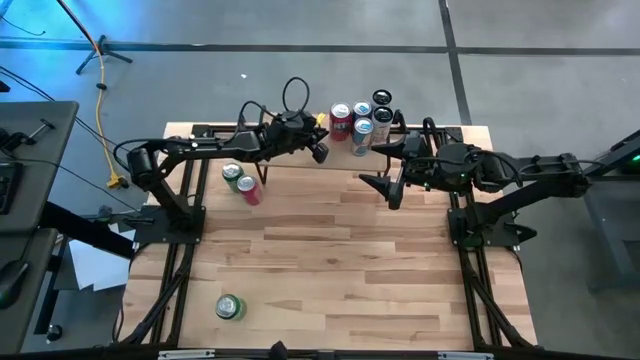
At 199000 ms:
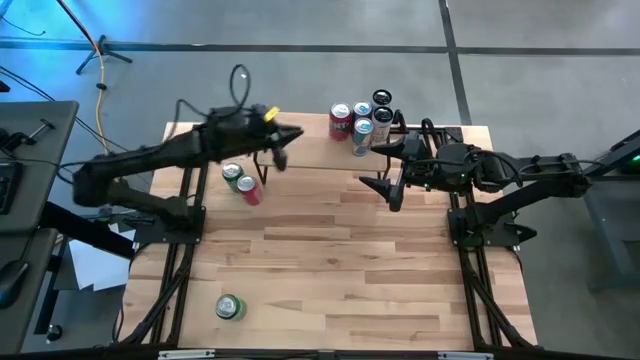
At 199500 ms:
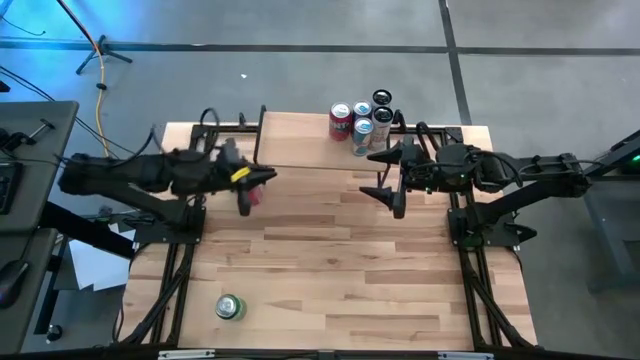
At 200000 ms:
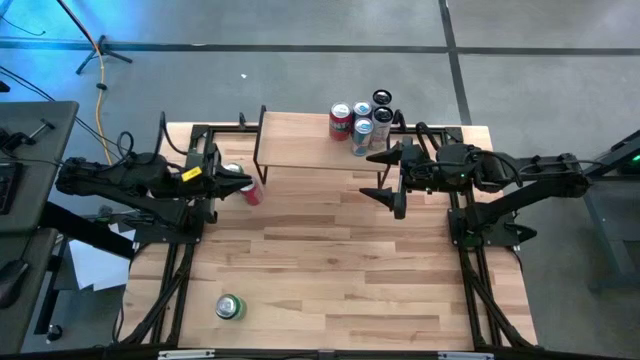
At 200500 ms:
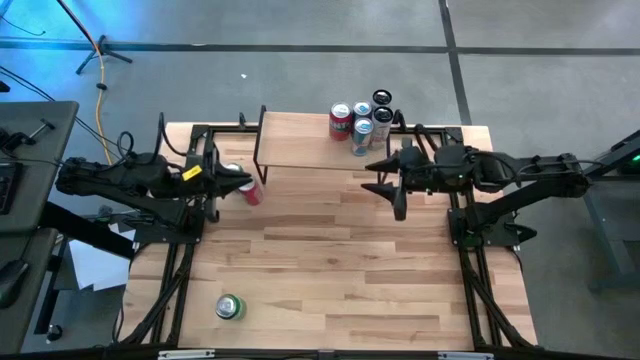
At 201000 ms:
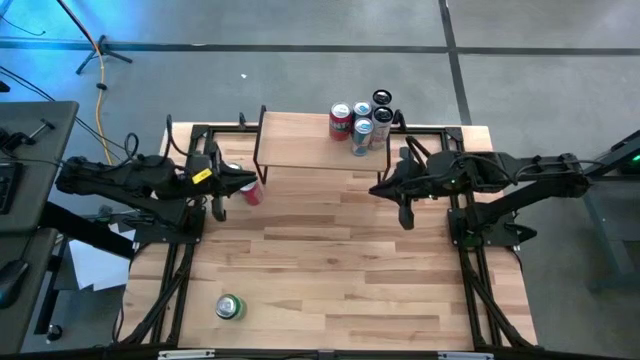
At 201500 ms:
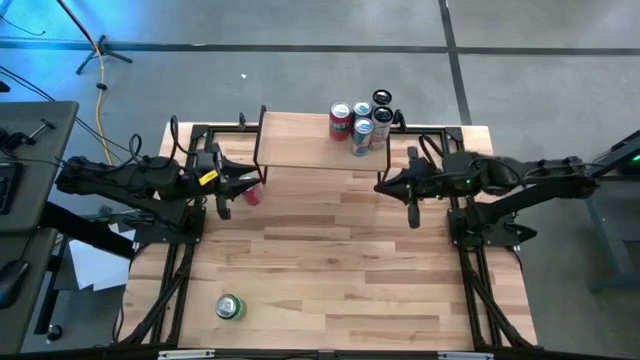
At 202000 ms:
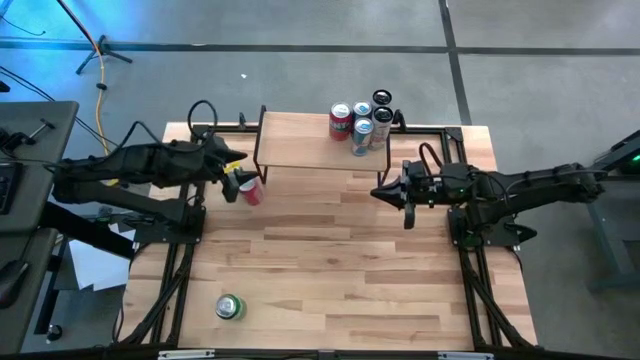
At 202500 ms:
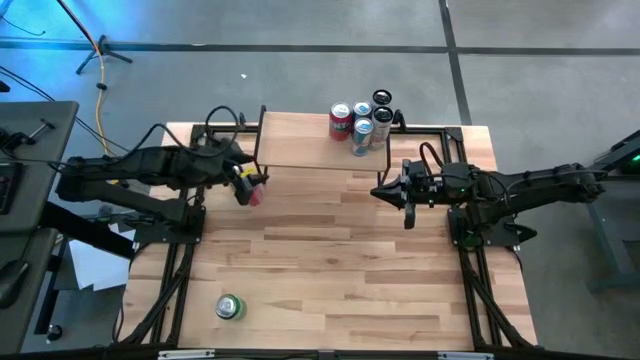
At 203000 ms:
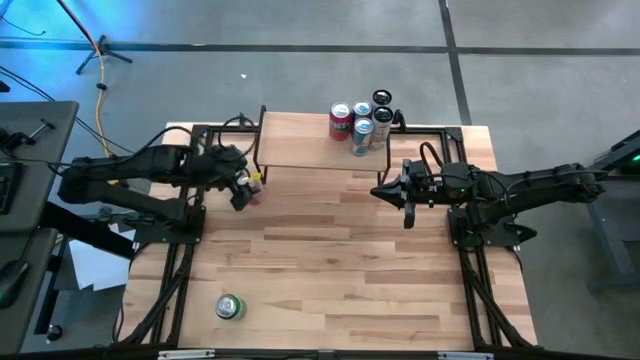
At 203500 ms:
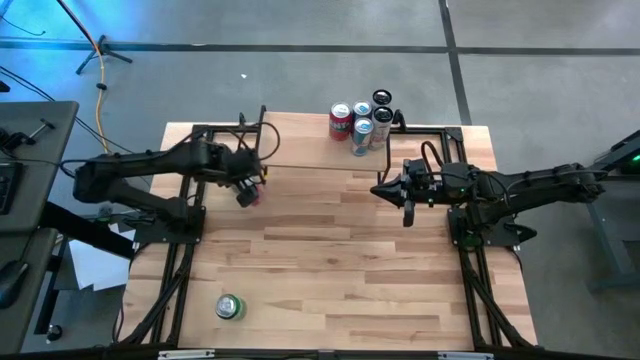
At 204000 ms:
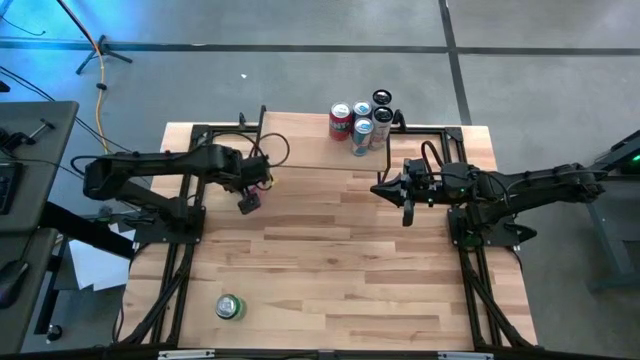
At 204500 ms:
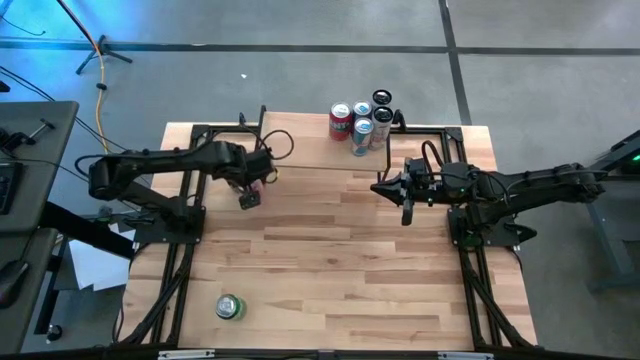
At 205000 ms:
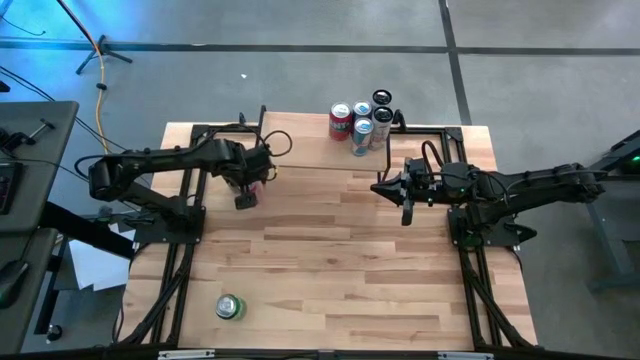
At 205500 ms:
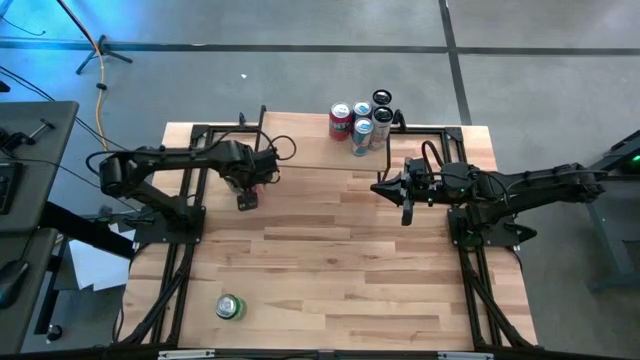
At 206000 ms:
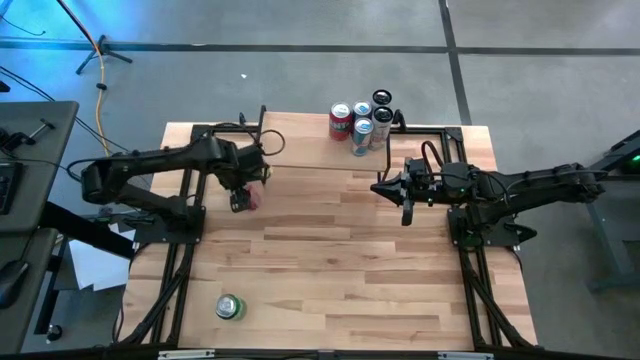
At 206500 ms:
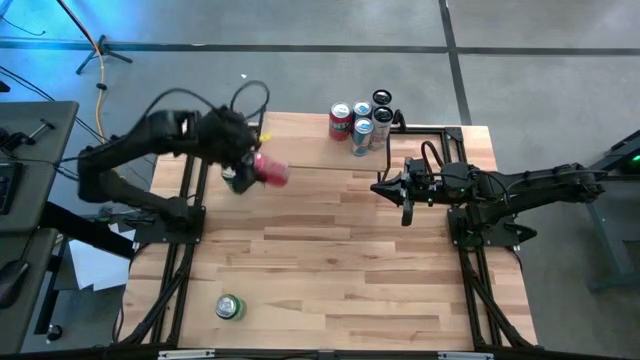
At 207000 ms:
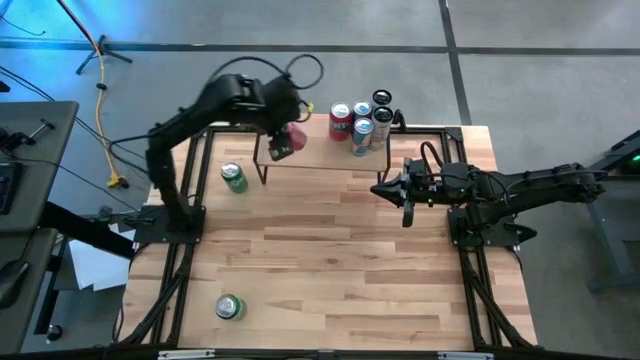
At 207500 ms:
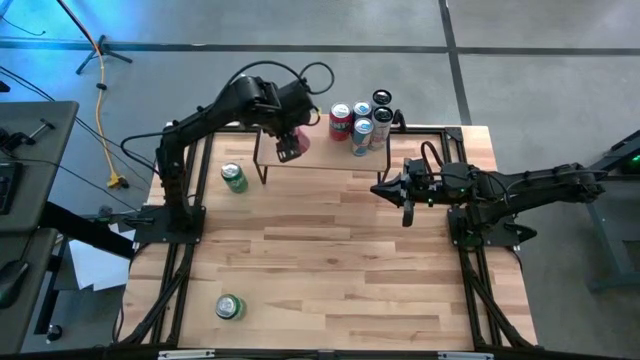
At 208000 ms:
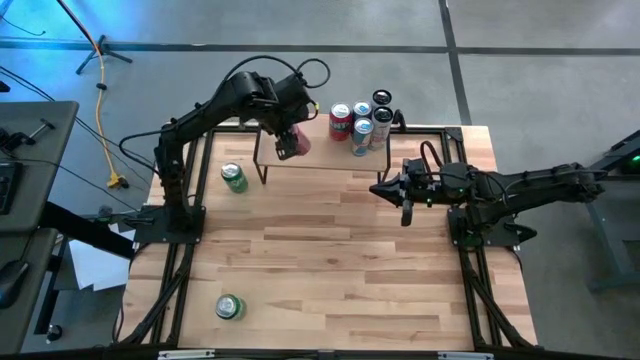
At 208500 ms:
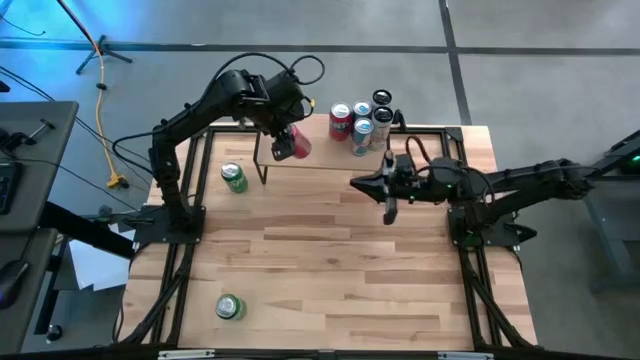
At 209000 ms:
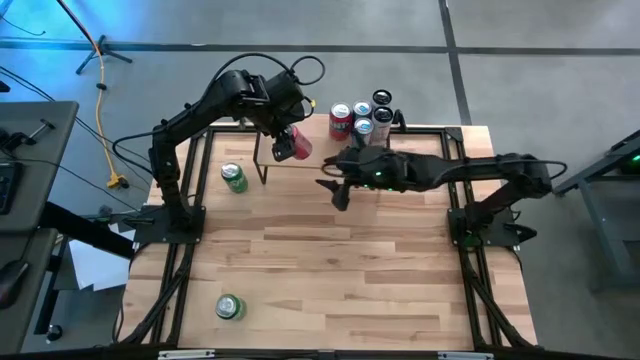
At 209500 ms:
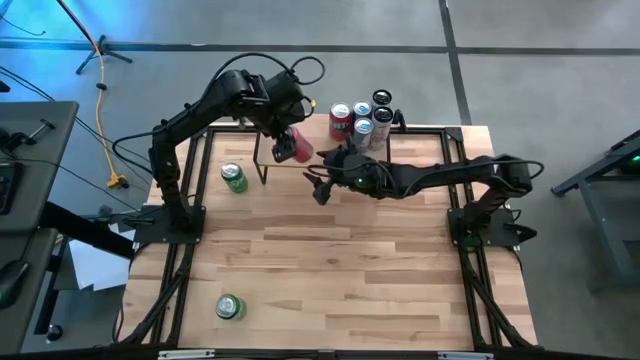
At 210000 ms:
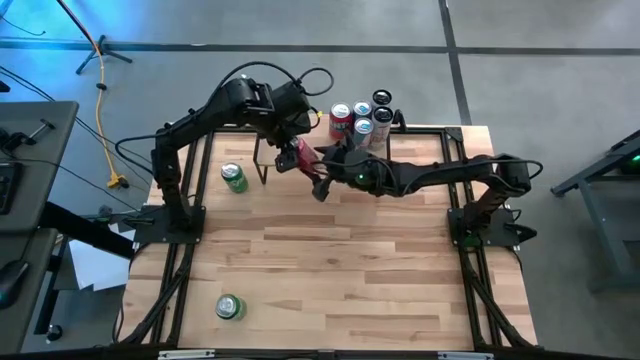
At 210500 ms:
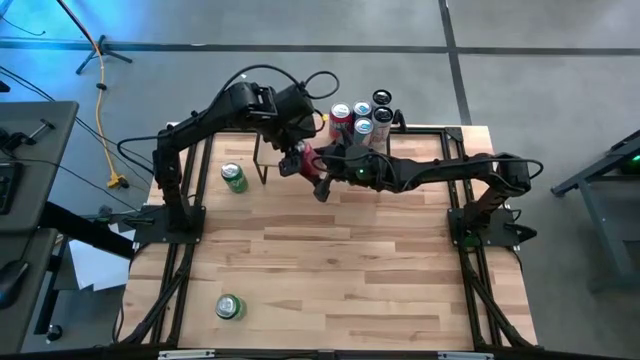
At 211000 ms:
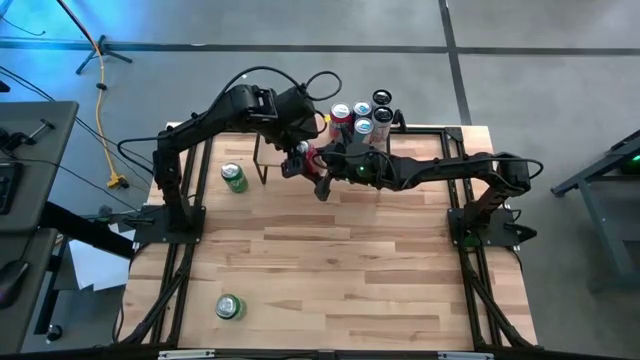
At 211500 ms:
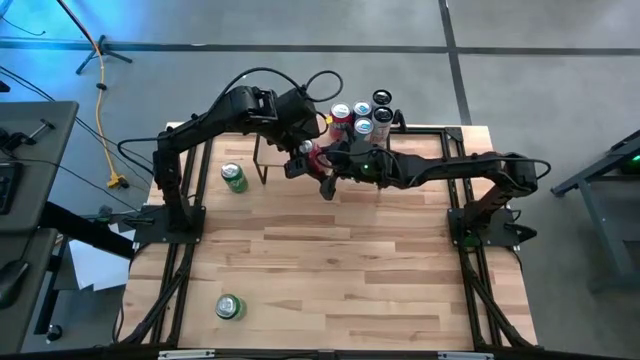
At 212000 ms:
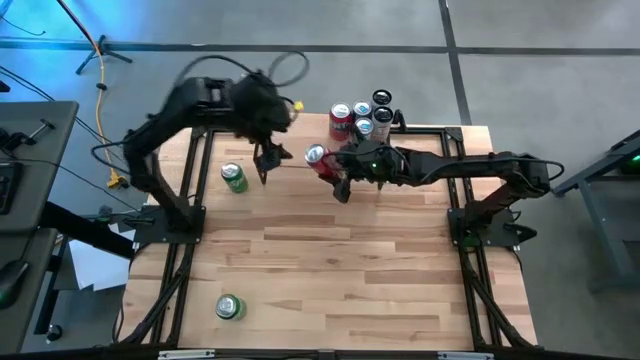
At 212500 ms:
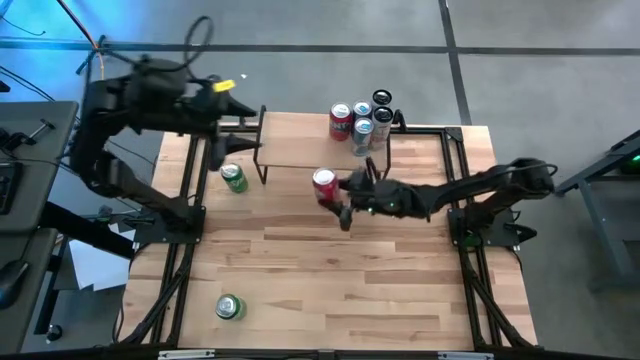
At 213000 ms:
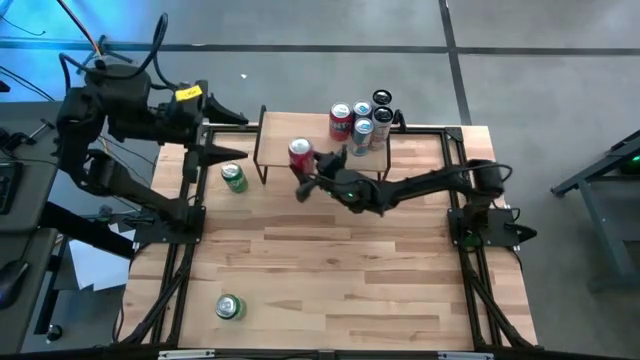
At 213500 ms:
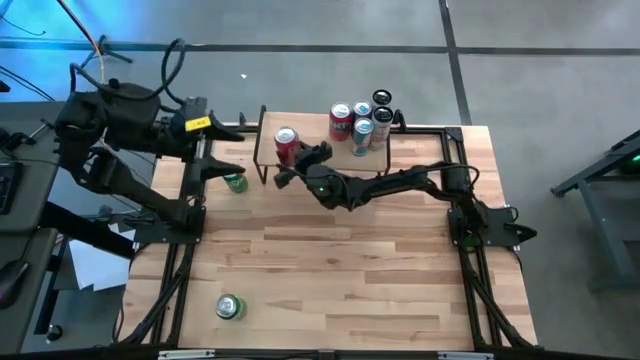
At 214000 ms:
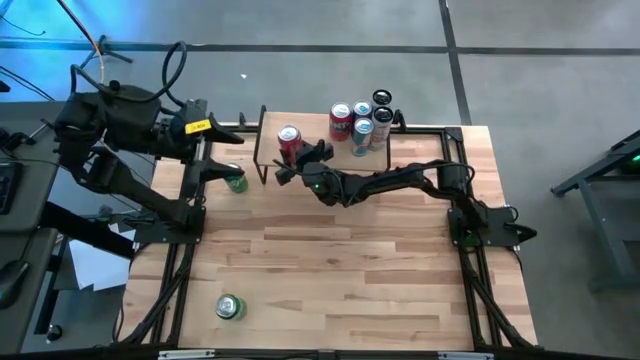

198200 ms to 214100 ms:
Task: Place canned beverage on shelf
Put the red soda can on the shelf aligned with the other red soda can
